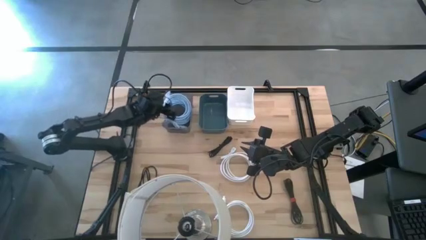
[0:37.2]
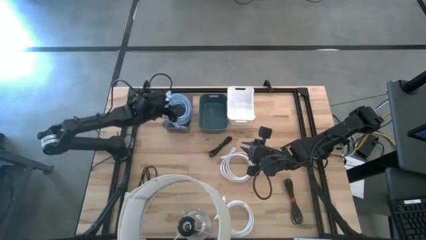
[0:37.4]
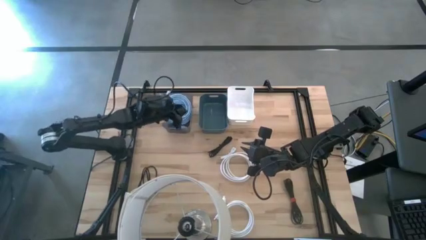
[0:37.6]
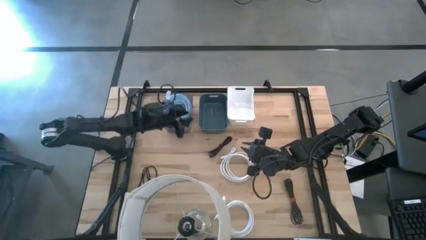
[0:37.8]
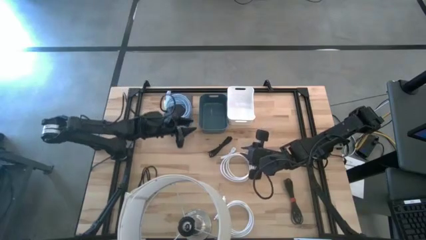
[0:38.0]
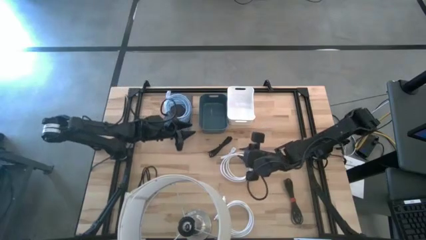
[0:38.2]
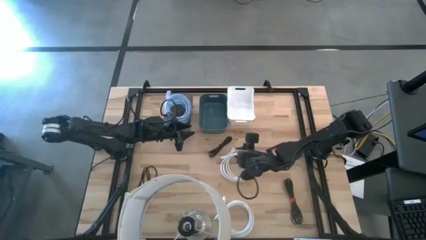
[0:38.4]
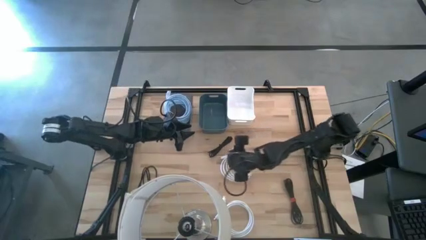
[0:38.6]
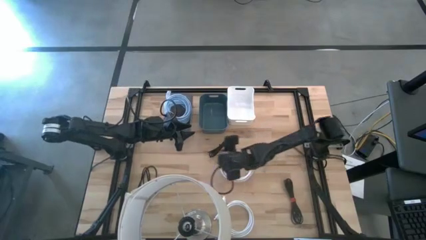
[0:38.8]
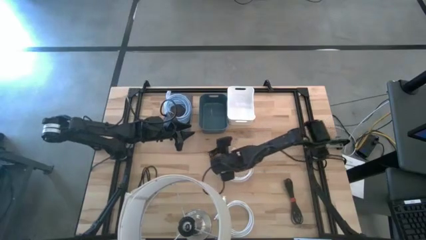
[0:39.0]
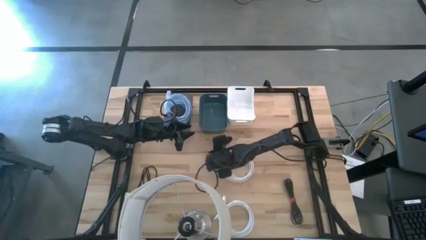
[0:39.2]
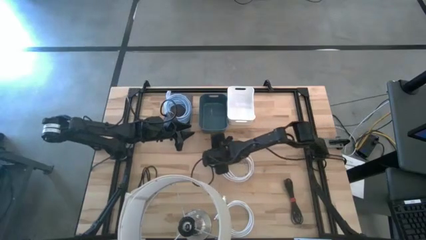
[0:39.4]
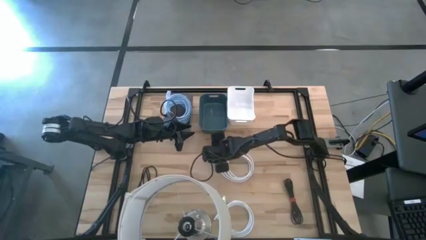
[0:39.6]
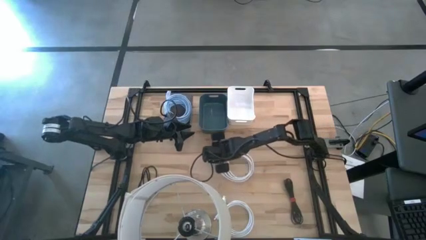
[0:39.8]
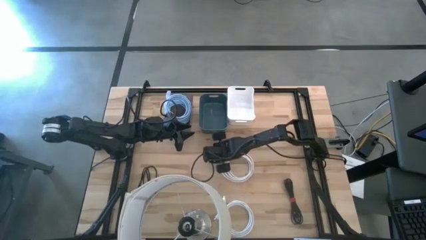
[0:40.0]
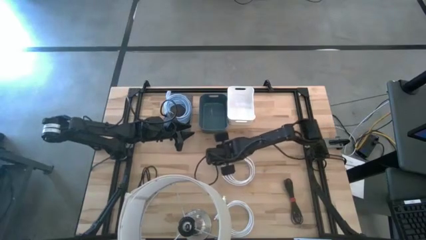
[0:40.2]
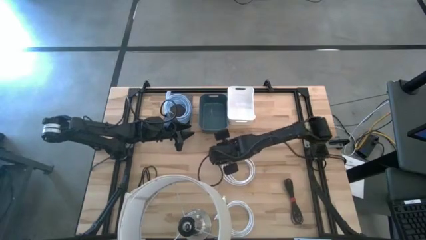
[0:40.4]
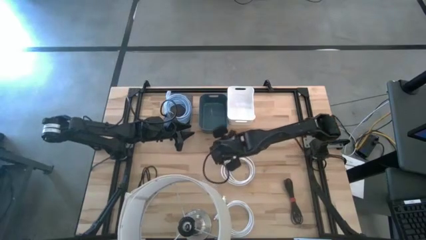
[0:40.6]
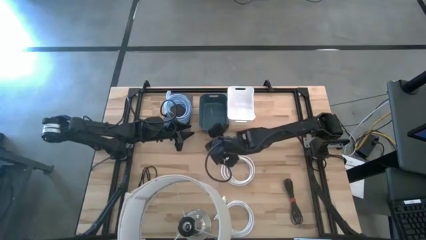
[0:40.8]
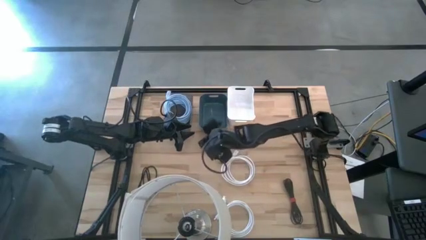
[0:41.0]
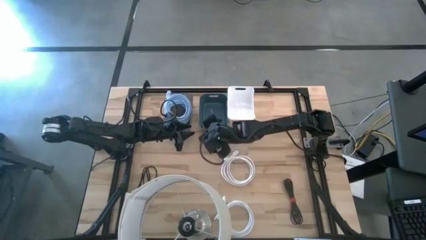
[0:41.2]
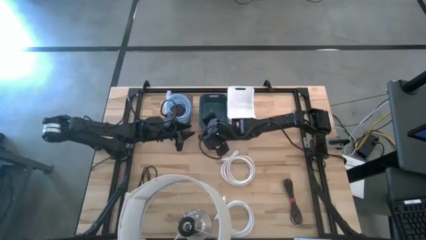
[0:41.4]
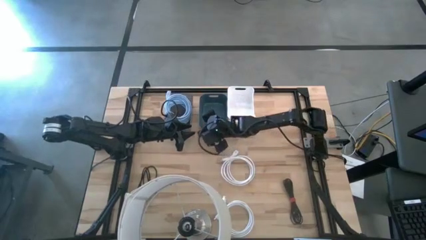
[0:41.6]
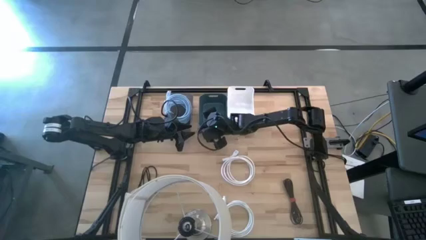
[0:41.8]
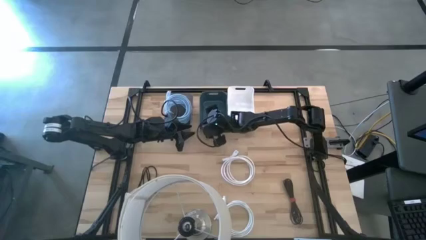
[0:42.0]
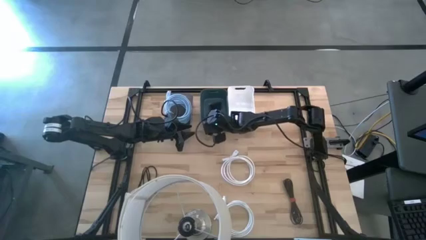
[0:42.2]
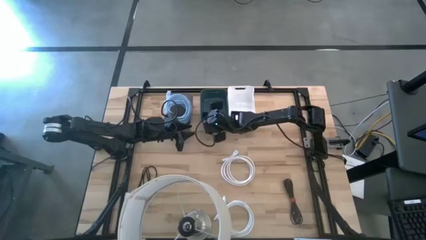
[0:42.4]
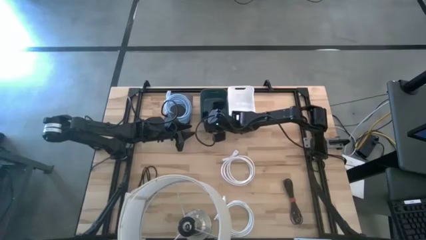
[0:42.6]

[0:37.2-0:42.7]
Task: Sort HDMI cables
Put the top black HDMI cable into the blue bin

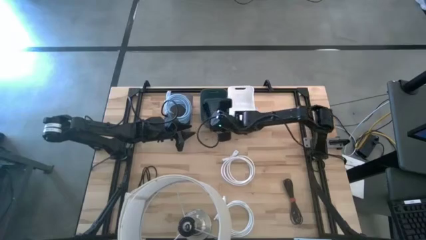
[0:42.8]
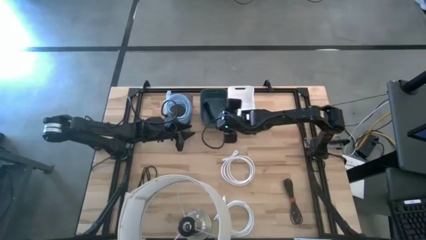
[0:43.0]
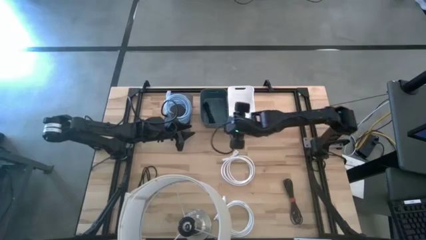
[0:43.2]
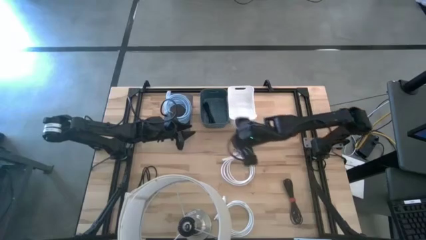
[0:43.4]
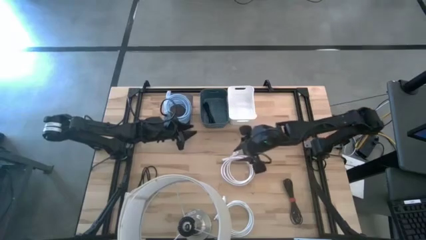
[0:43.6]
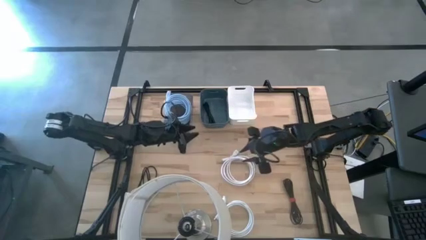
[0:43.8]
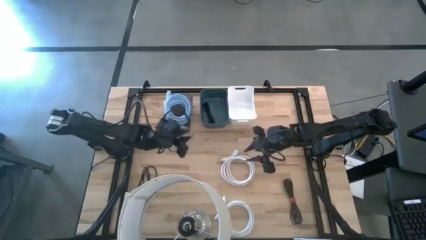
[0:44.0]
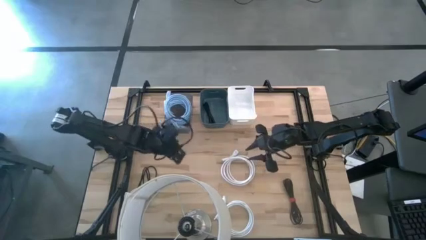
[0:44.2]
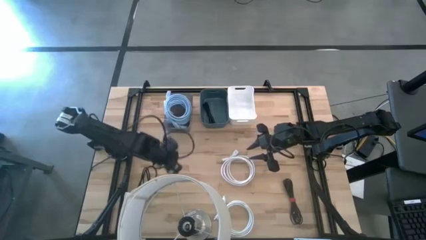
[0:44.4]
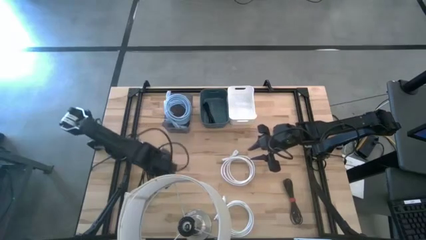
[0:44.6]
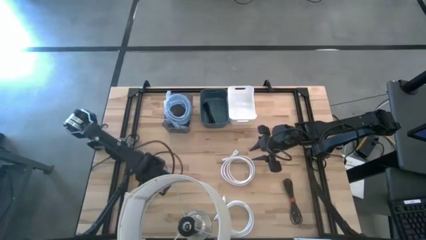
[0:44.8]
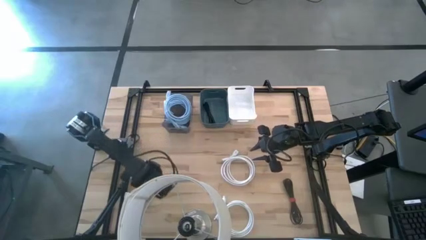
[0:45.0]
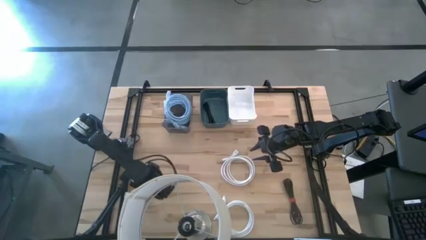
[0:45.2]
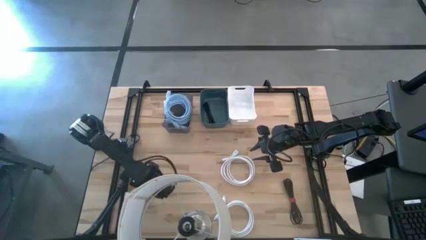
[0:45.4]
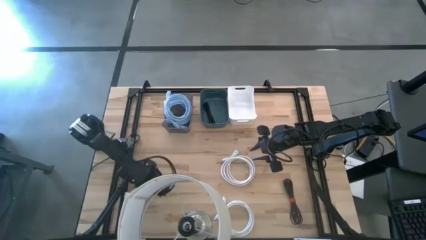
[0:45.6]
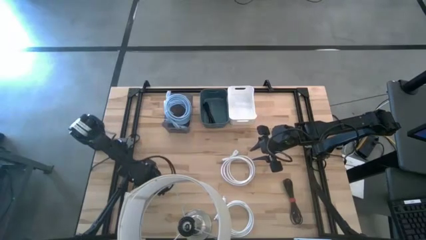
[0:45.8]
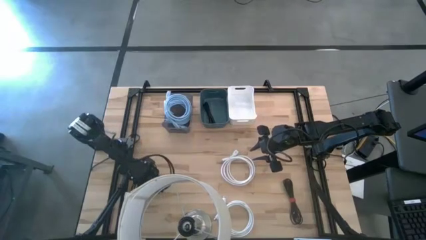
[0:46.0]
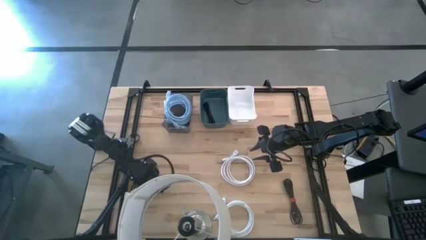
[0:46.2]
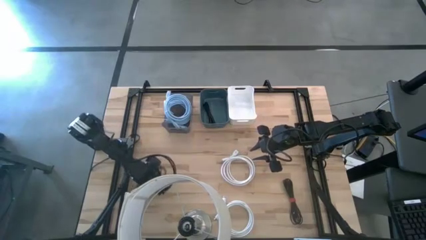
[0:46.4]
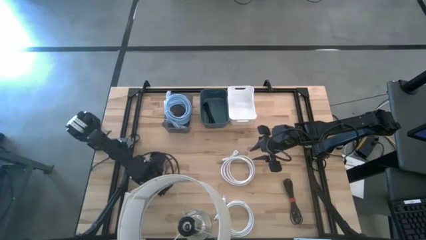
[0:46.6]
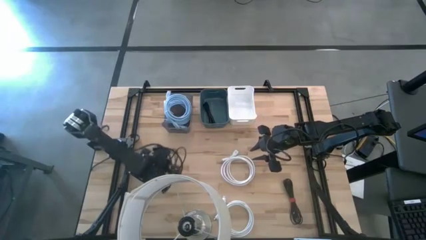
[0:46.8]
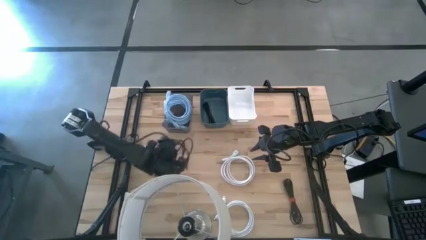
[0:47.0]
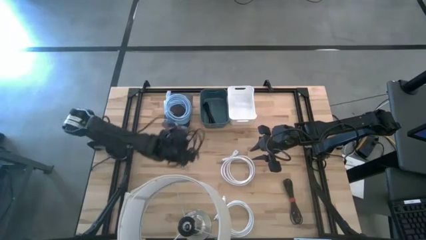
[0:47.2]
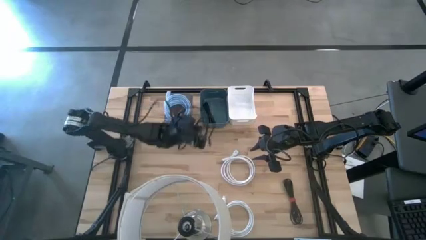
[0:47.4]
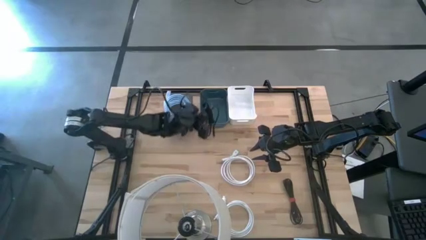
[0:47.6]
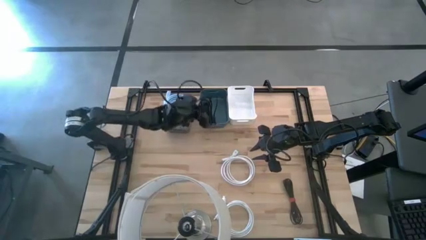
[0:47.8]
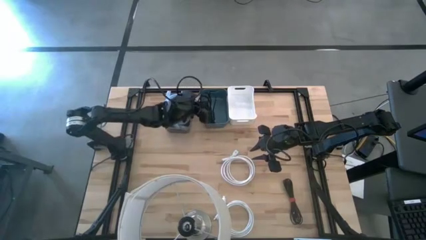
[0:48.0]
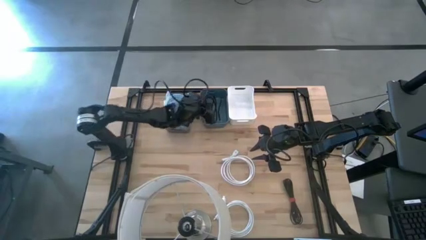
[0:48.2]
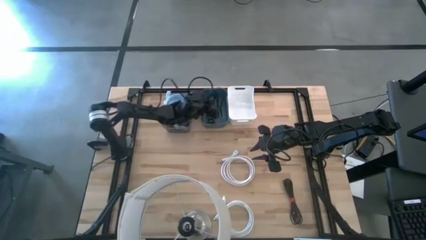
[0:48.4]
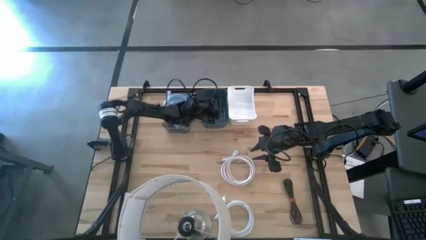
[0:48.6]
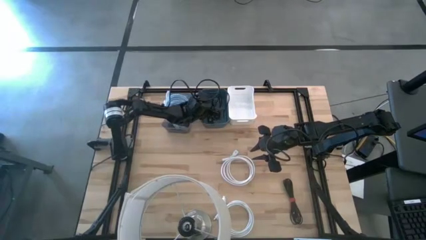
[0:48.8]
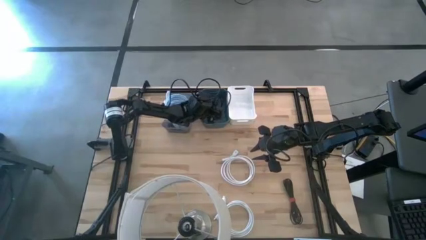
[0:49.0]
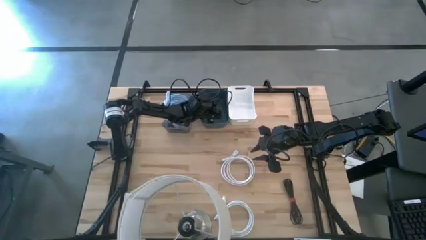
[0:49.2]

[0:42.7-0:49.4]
Put the left black HDMI cable into the blue bin

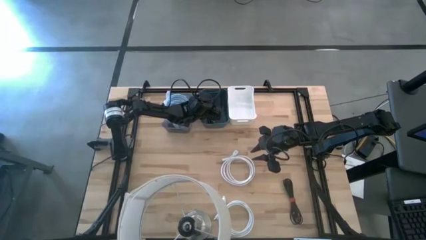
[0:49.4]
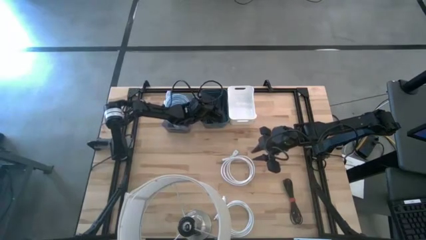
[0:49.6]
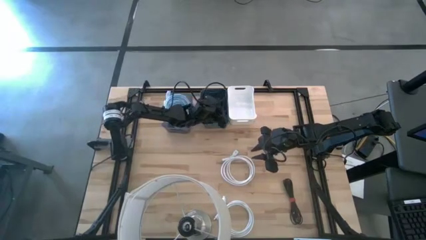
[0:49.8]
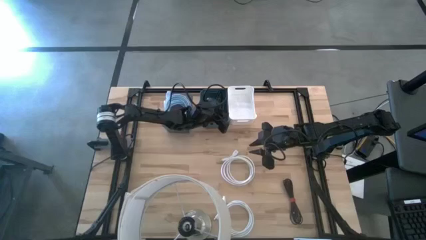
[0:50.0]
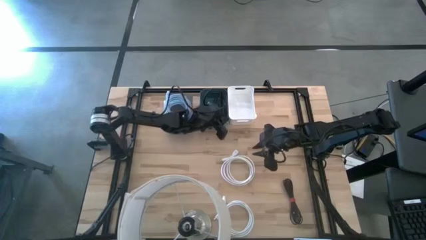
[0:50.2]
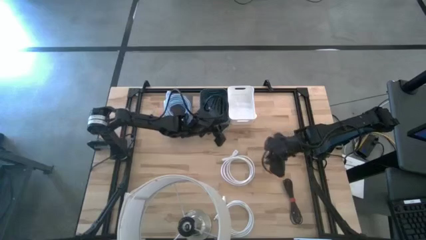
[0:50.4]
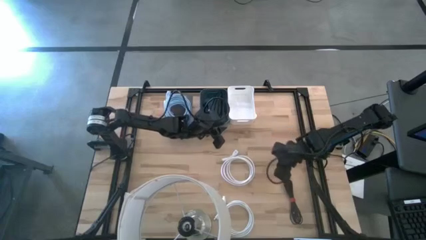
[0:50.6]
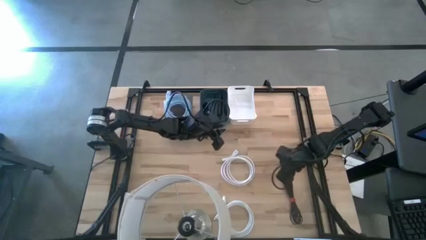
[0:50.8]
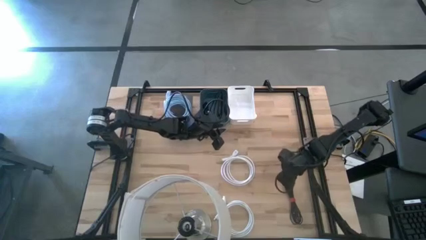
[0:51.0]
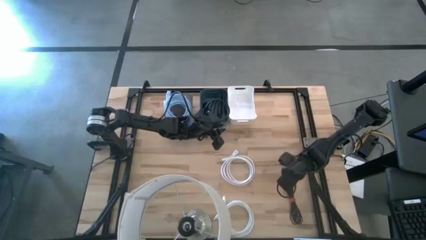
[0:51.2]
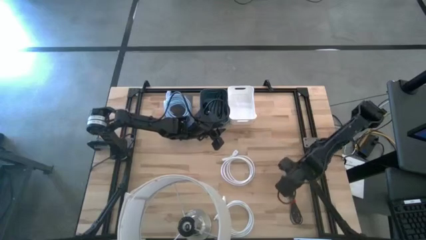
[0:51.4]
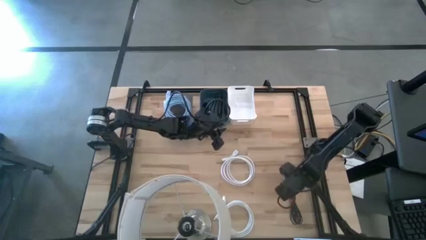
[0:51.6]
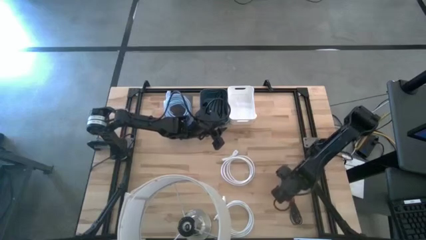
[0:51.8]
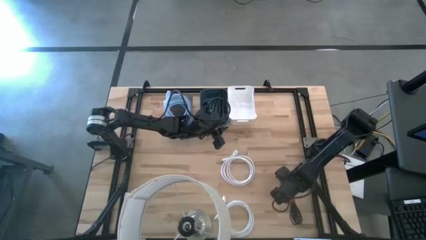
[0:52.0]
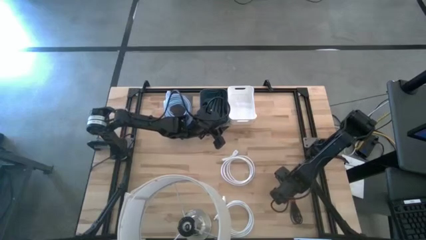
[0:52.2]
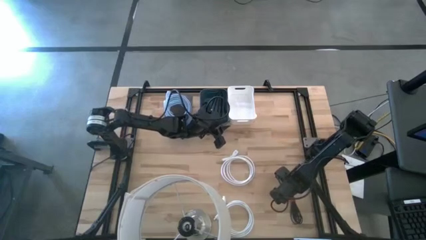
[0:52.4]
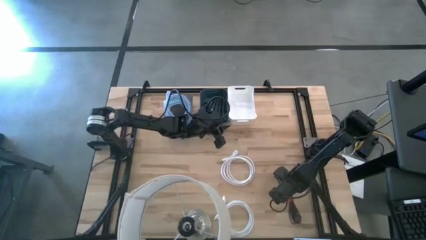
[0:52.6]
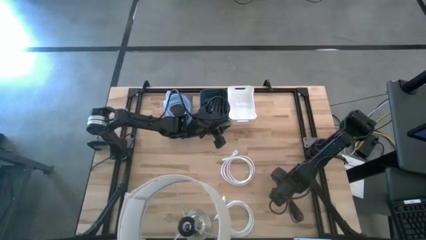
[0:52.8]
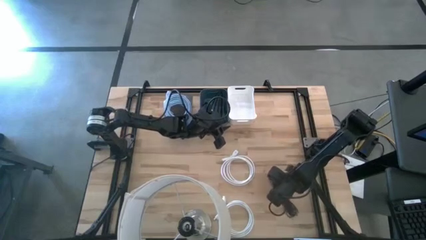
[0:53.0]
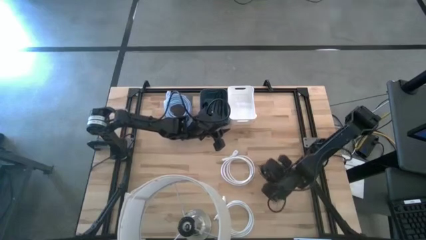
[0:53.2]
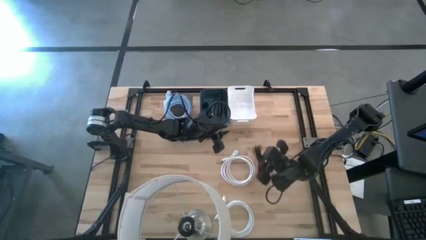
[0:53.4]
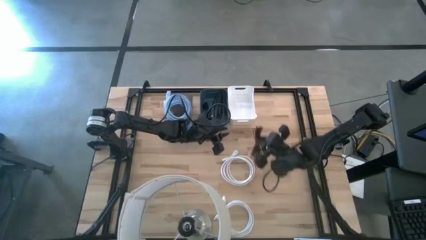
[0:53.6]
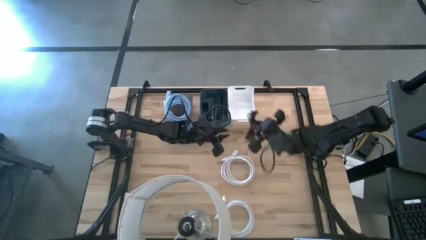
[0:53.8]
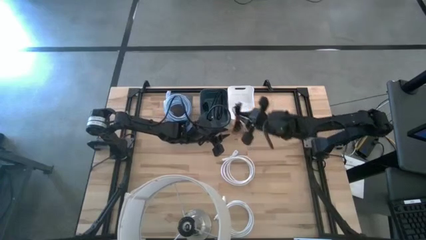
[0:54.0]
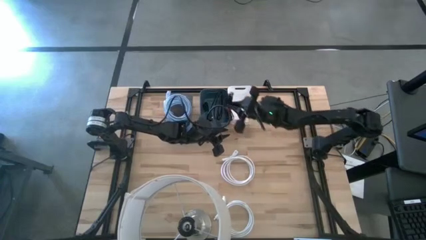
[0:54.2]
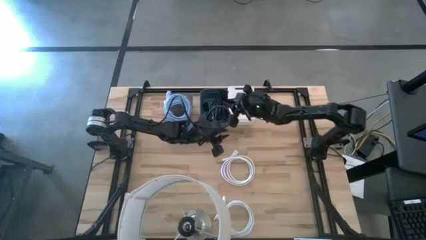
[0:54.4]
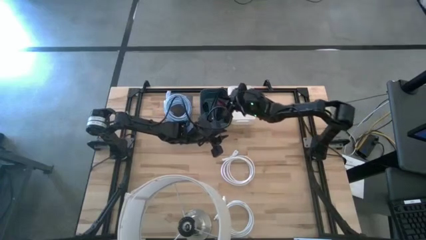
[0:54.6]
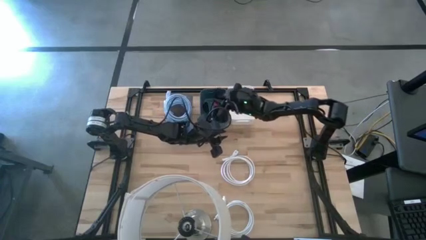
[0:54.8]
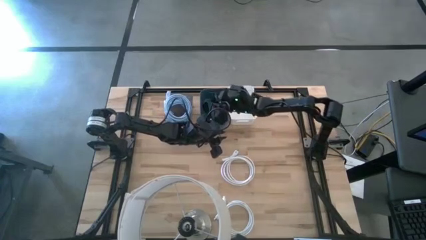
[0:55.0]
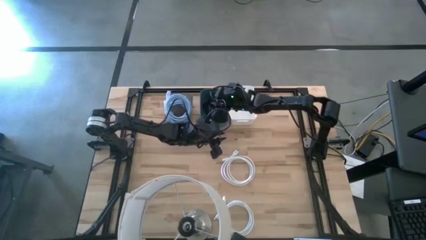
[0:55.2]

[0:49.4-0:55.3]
Put the black HDMI cable into the blue bin
